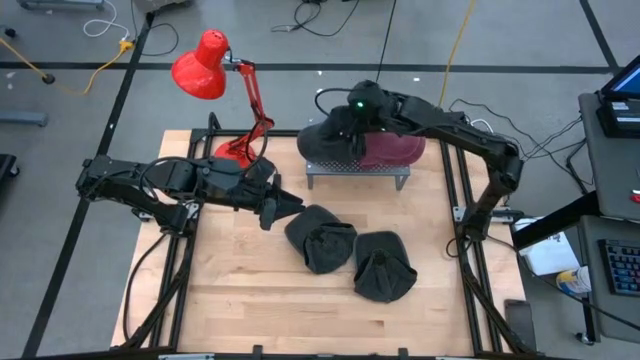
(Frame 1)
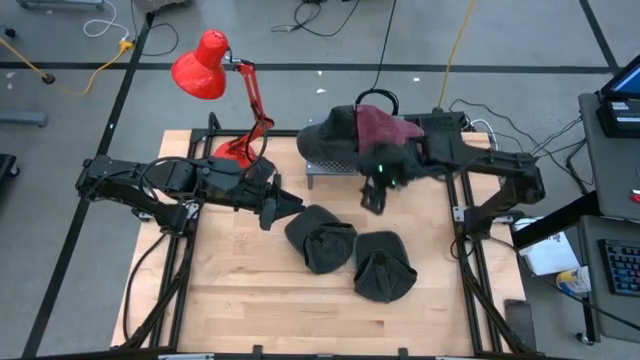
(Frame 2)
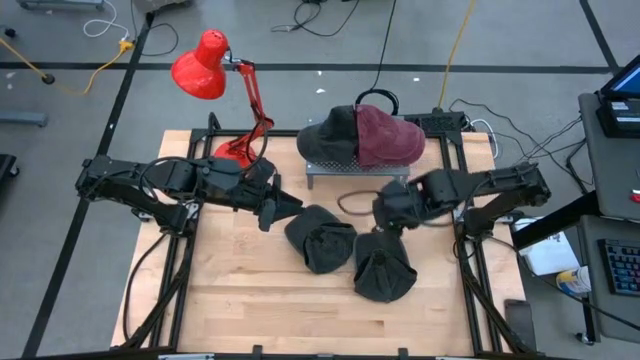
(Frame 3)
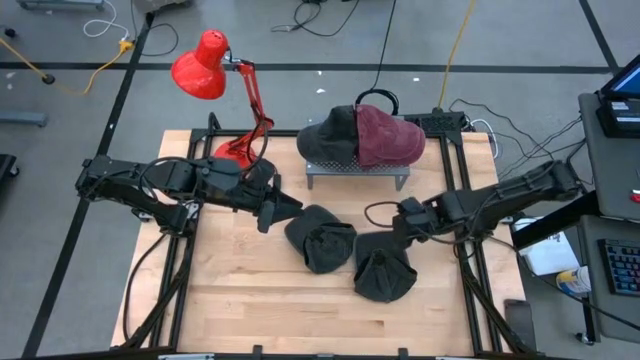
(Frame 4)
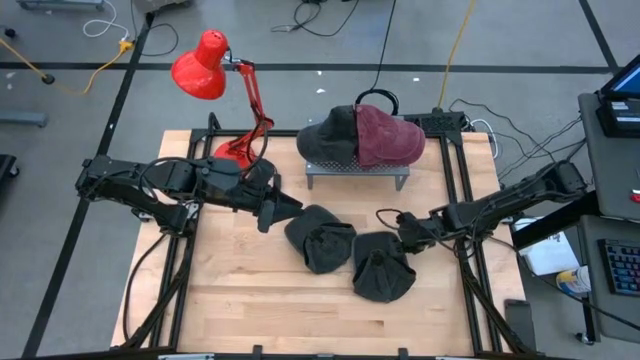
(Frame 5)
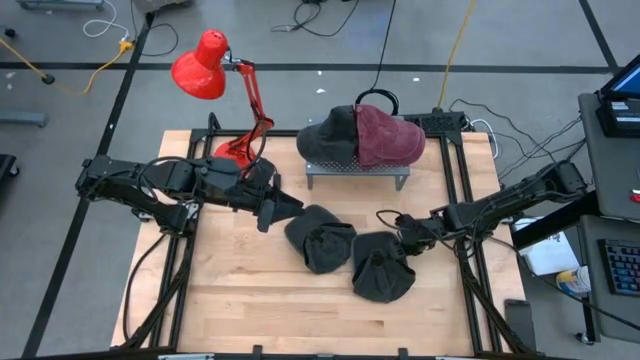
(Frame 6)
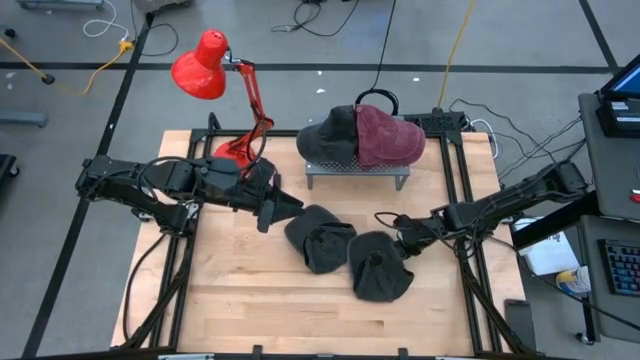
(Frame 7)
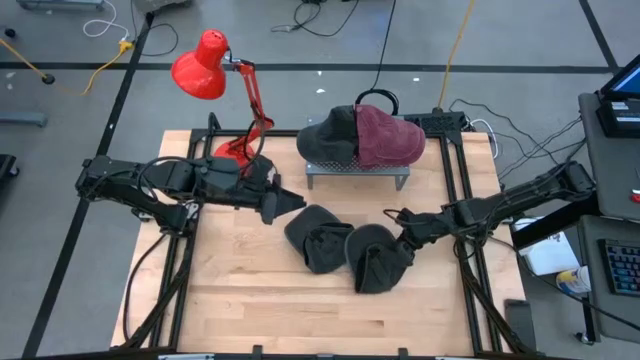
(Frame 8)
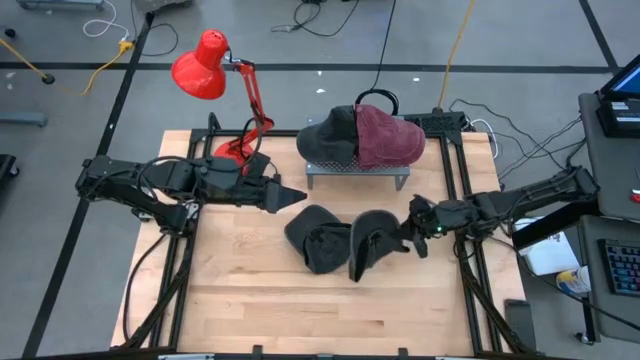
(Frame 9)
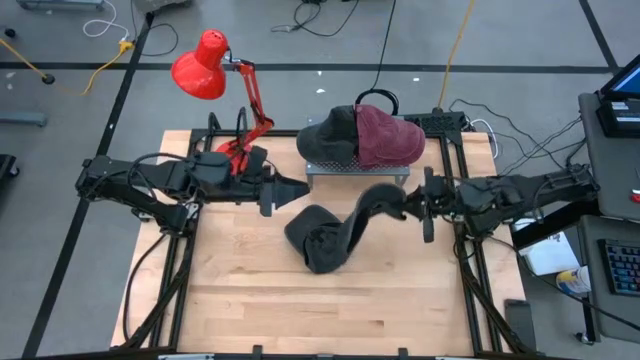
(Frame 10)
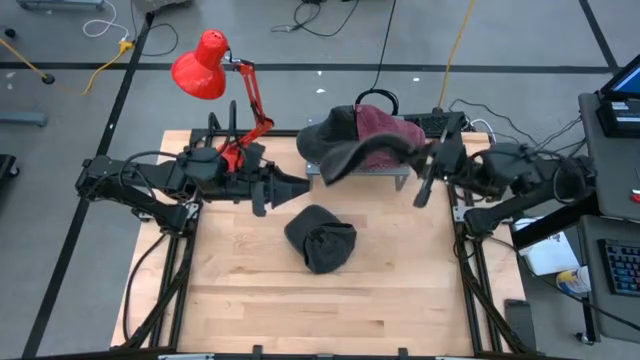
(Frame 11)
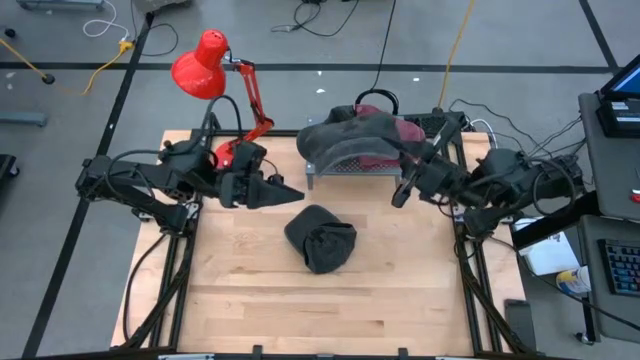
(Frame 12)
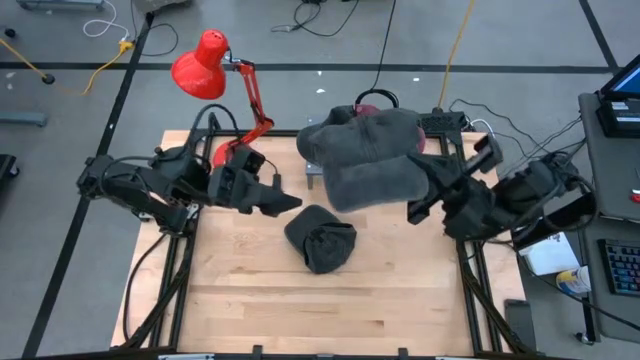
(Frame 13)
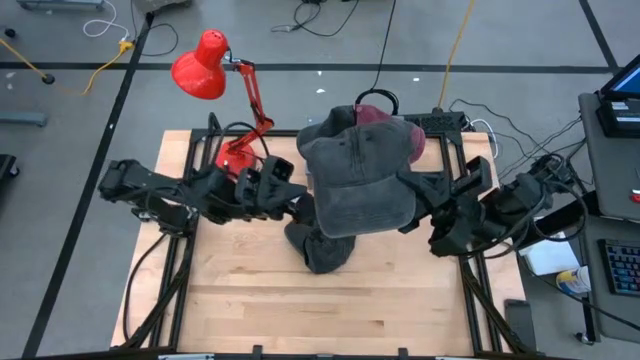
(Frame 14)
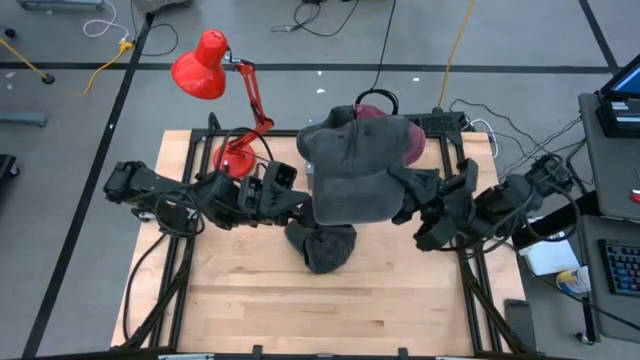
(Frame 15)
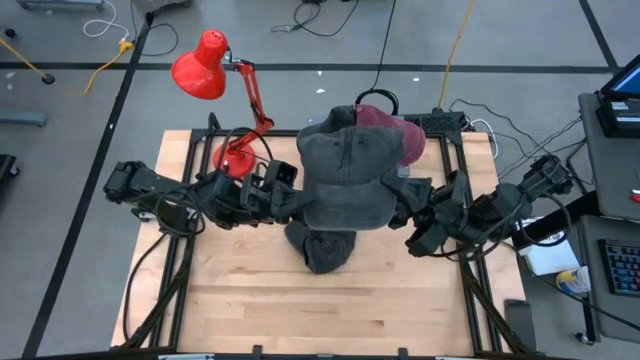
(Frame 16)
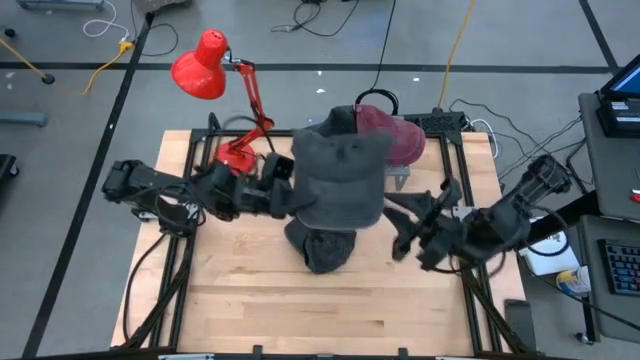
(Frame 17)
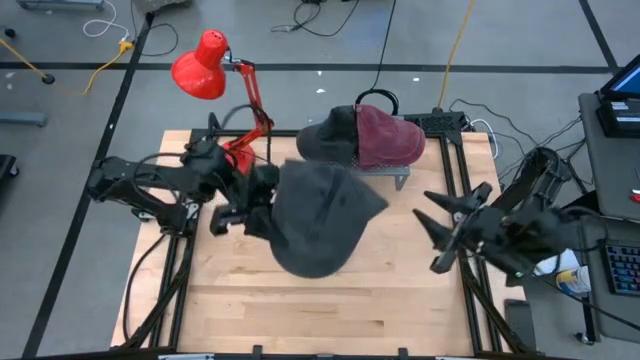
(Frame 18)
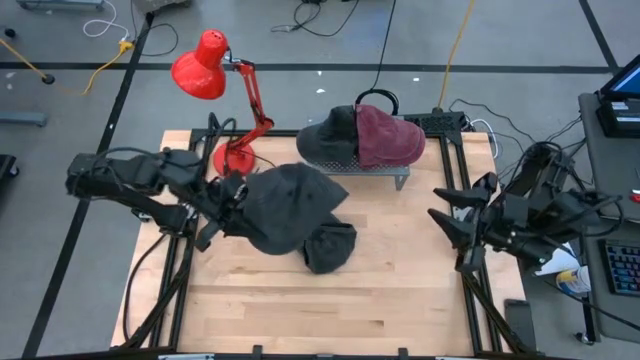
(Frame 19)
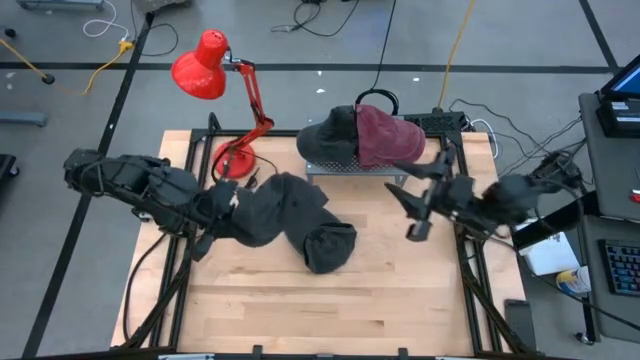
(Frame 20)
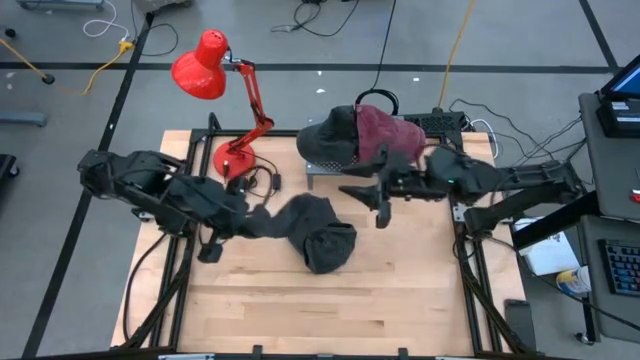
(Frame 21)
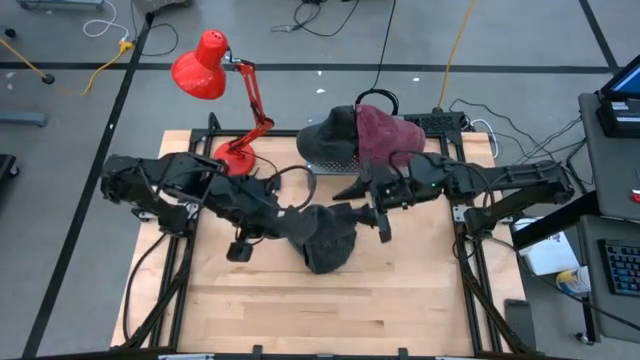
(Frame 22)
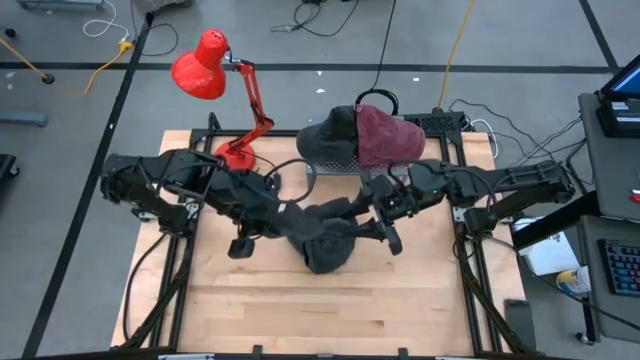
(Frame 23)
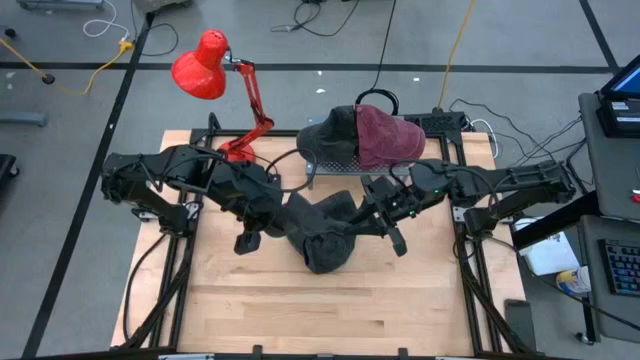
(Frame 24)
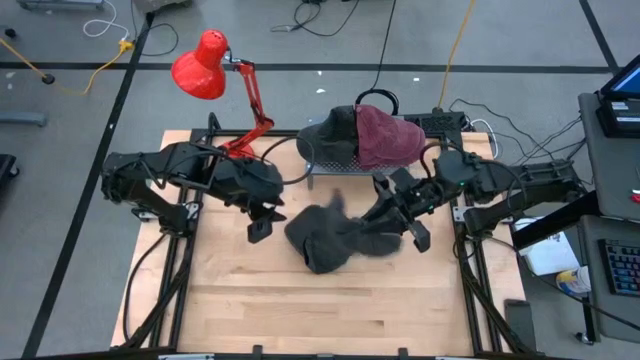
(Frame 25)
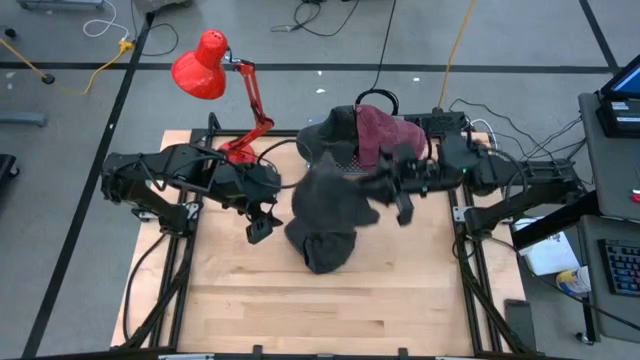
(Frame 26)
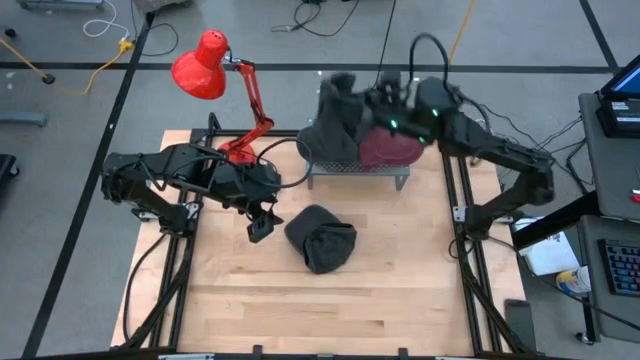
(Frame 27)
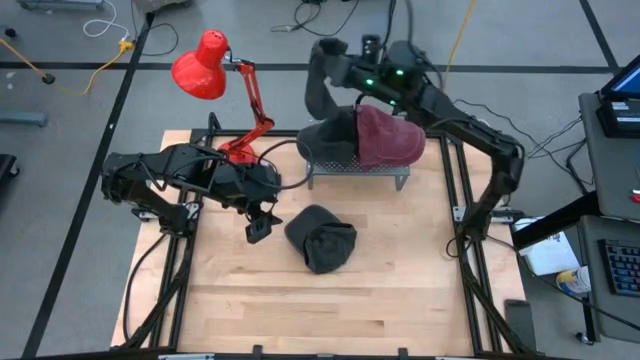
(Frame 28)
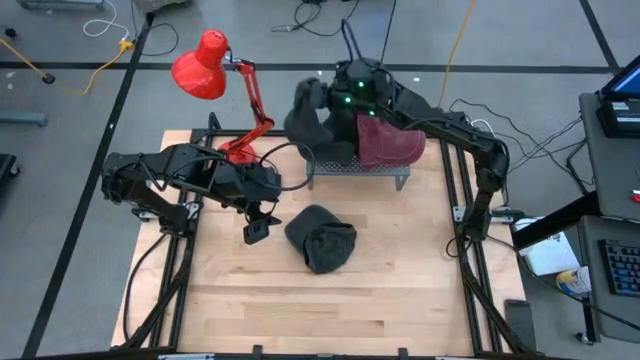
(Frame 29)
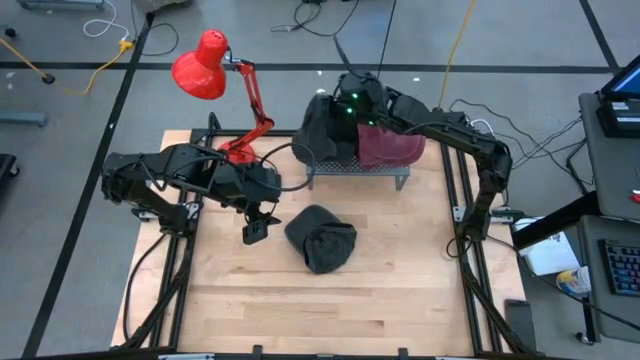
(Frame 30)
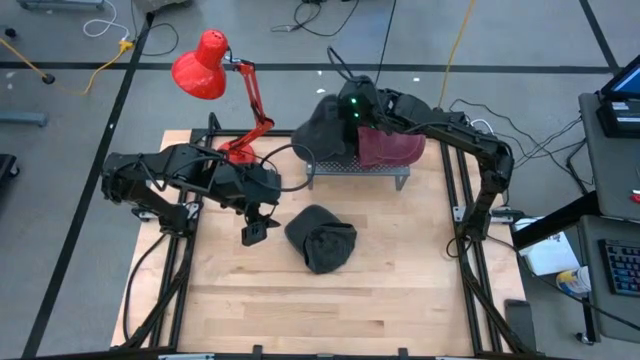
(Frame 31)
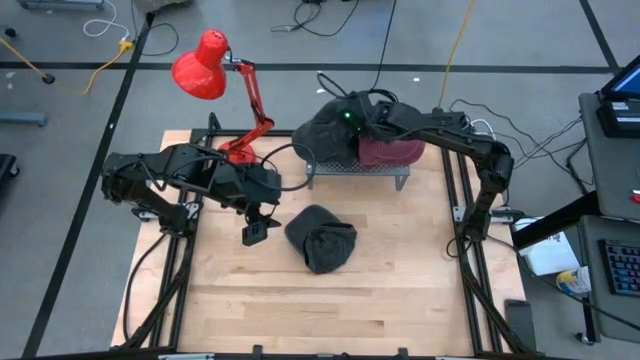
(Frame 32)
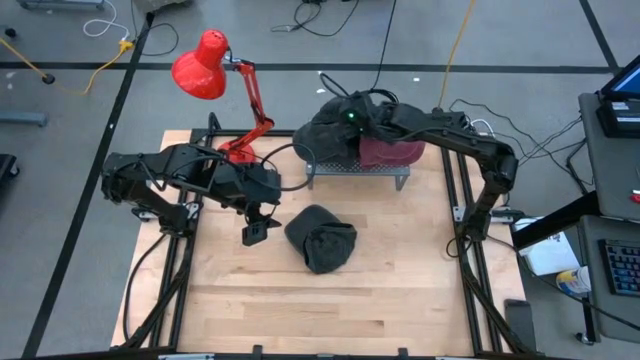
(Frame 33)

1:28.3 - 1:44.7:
Task: Pick & Place hat
Stack the right black cap on the black cap on the shelf

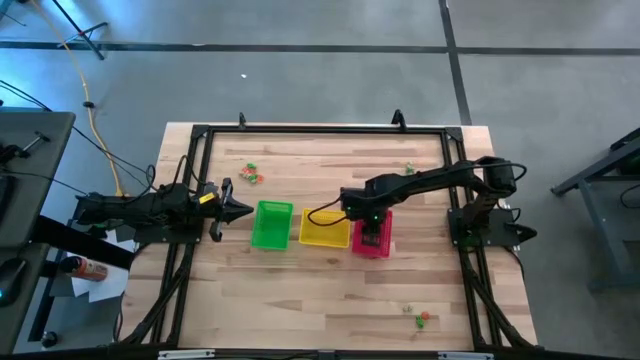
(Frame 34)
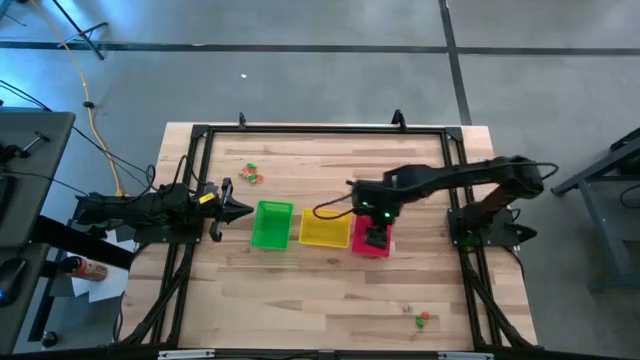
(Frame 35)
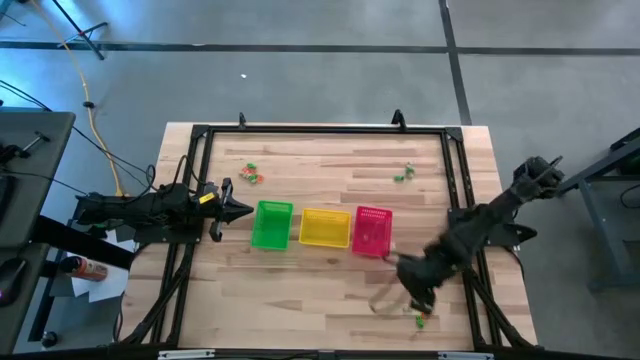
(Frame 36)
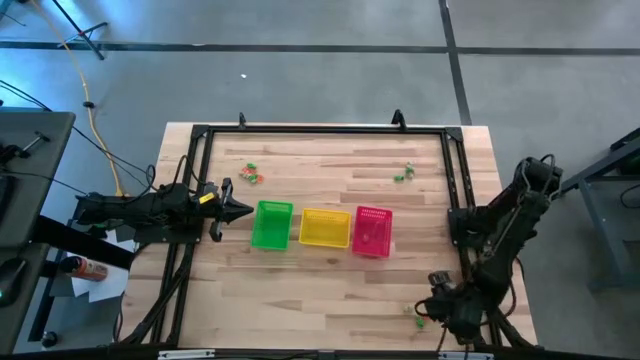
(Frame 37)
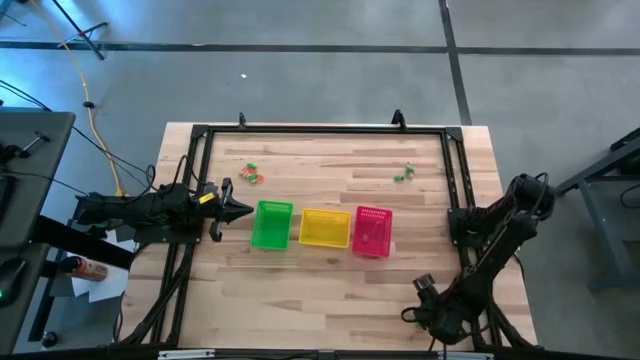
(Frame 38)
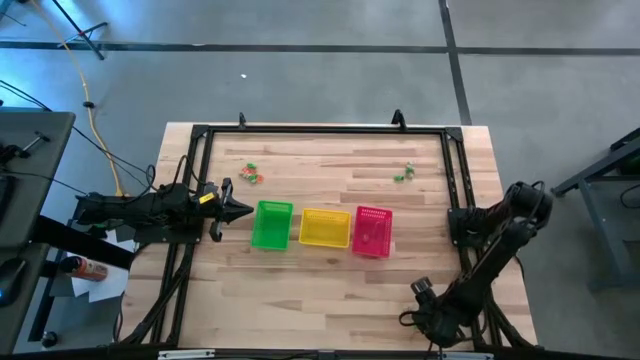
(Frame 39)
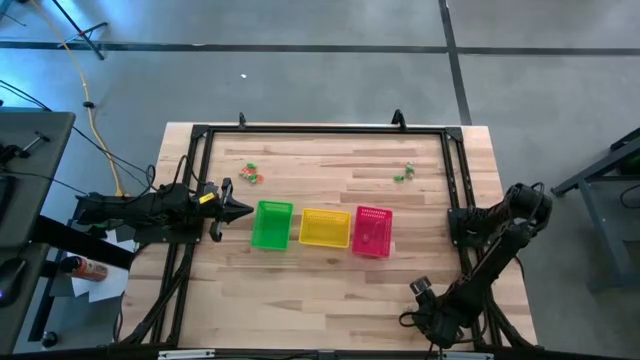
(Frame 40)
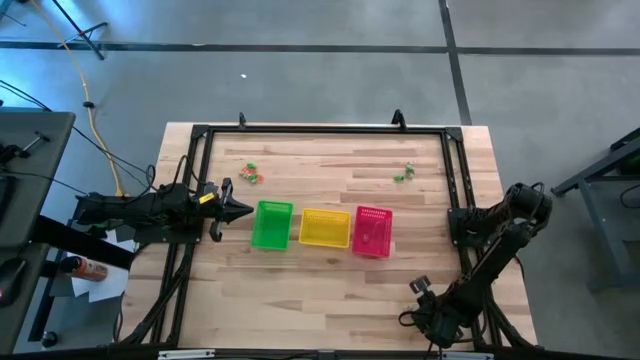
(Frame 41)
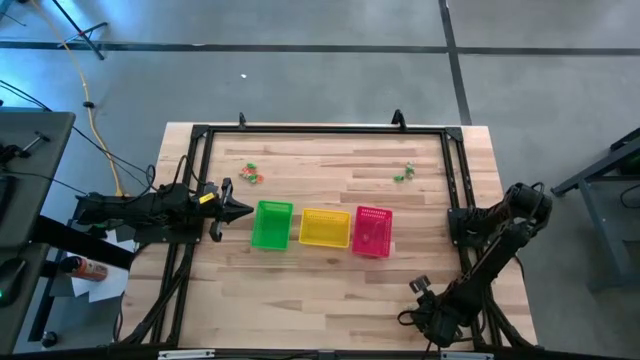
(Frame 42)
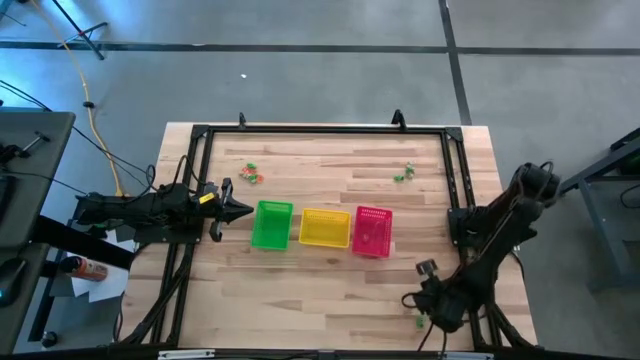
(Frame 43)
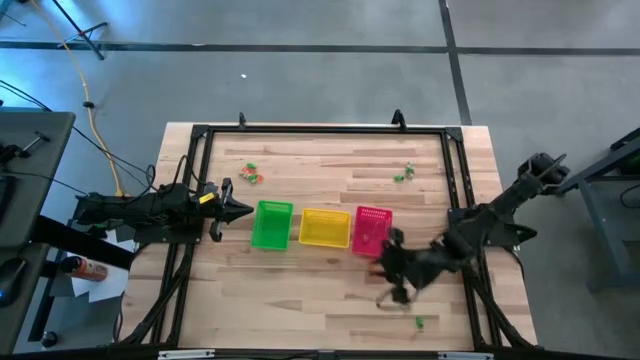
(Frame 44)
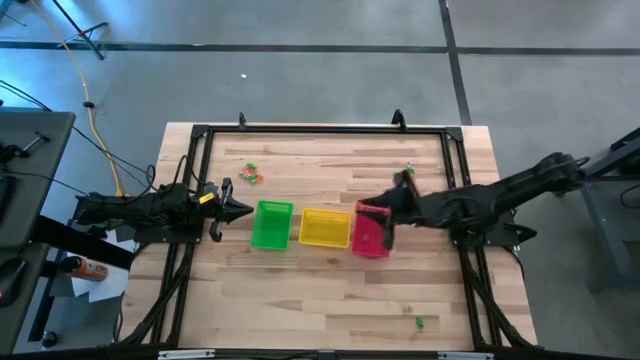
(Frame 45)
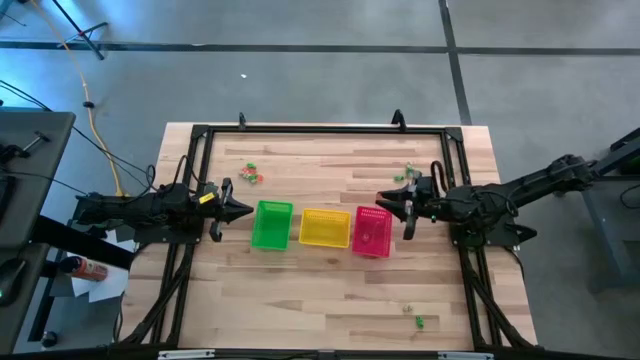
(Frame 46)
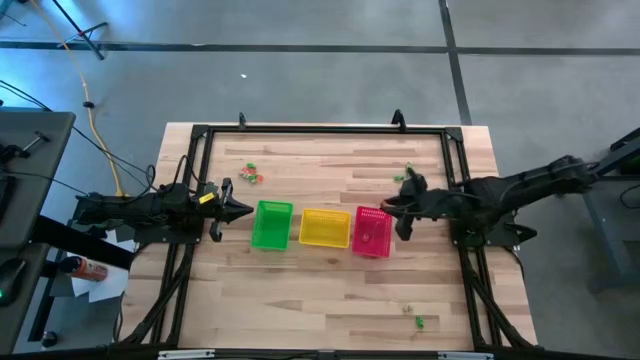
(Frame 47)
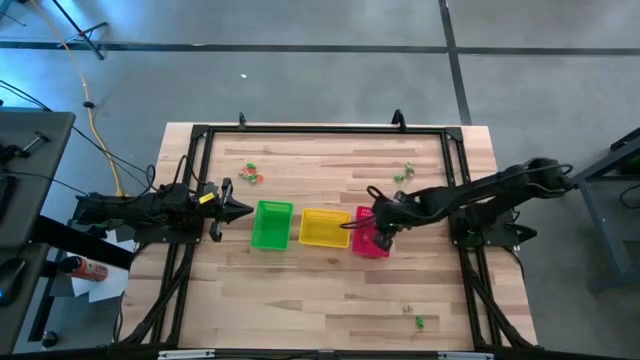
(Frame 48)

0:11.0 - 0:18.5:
Task: Sort Halloween decoration
Put the orange pumpkin toy into the red basket
